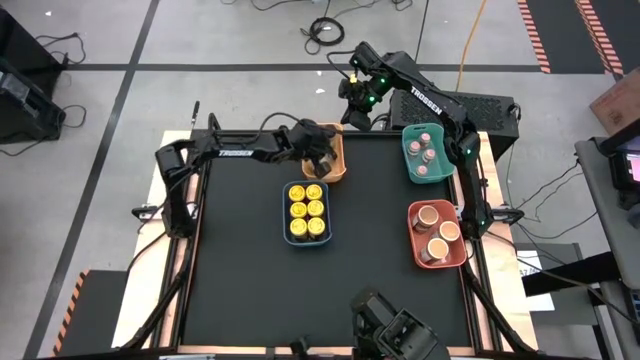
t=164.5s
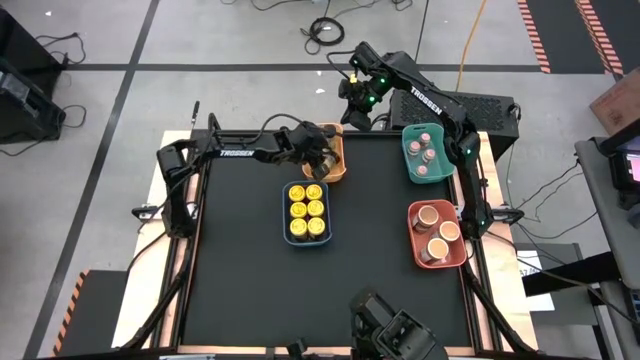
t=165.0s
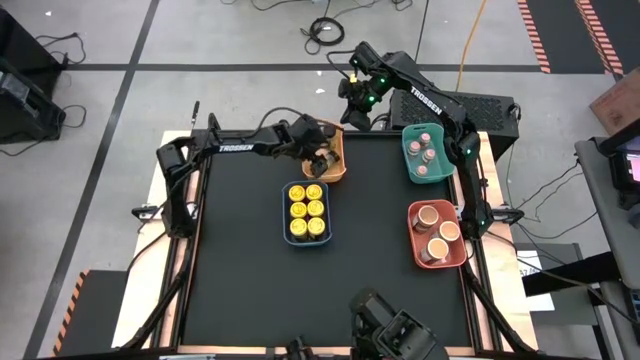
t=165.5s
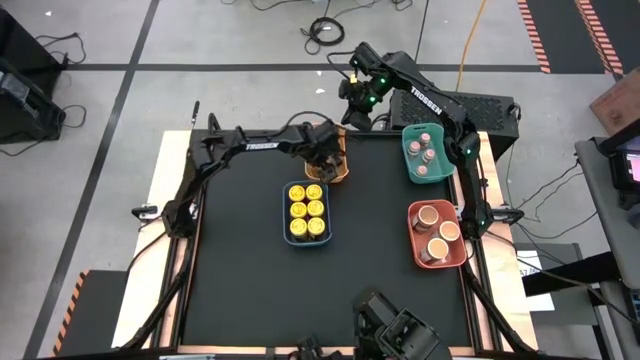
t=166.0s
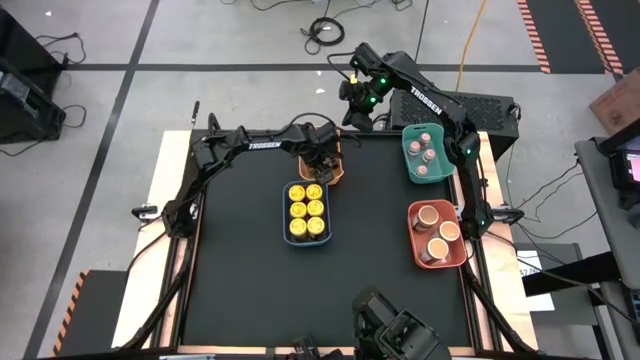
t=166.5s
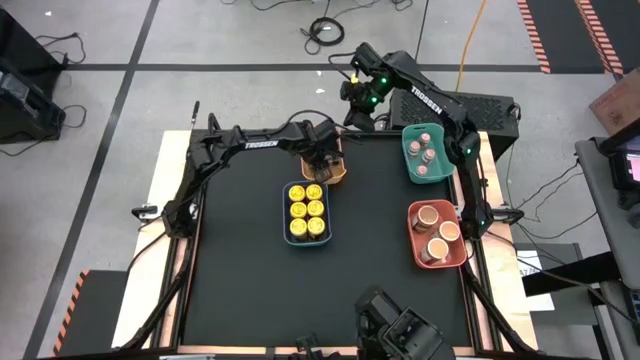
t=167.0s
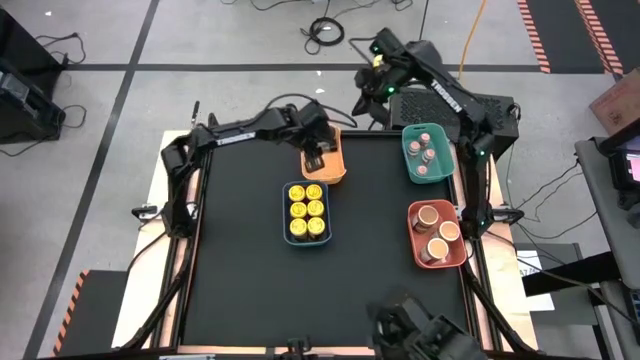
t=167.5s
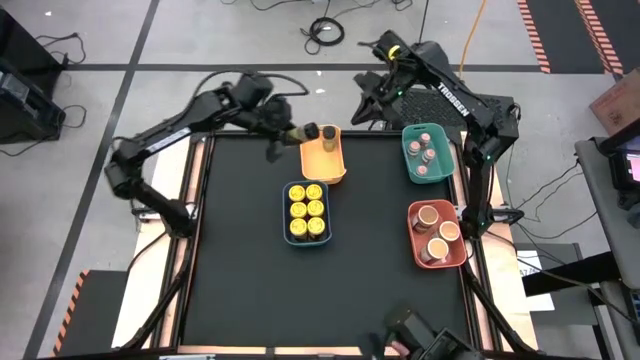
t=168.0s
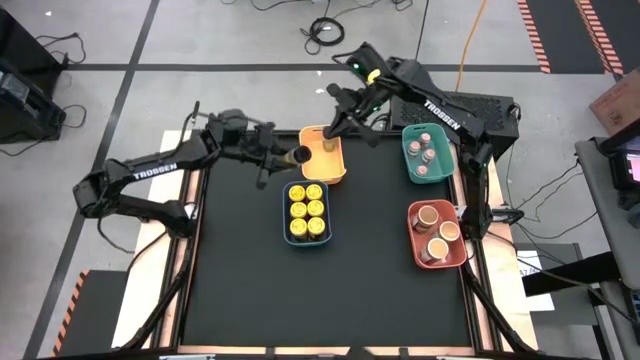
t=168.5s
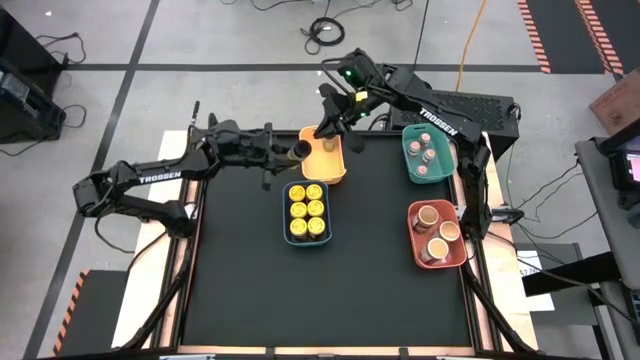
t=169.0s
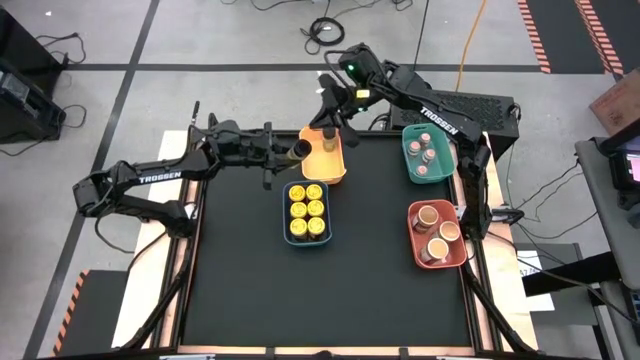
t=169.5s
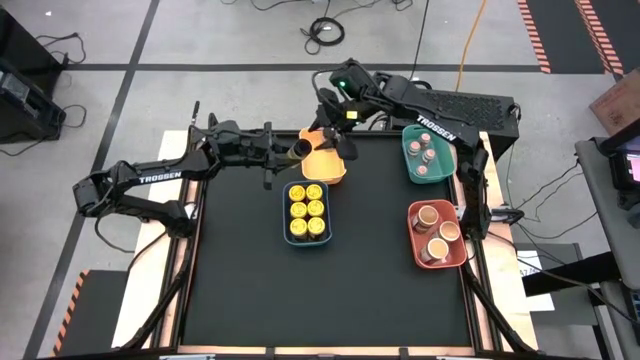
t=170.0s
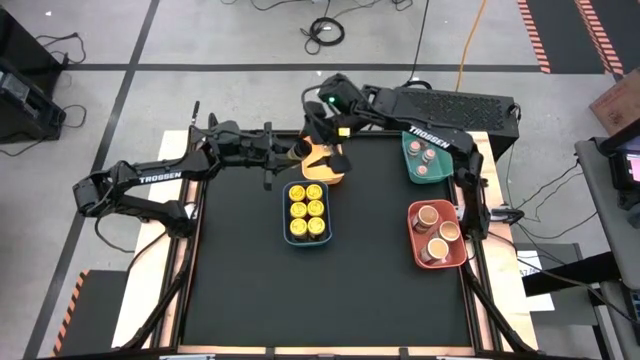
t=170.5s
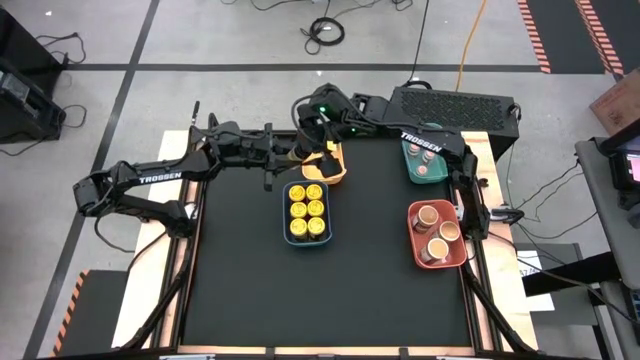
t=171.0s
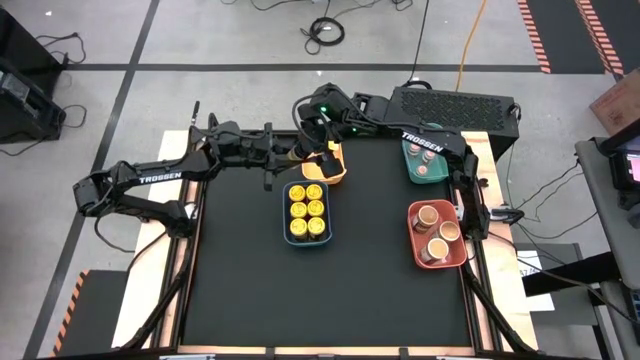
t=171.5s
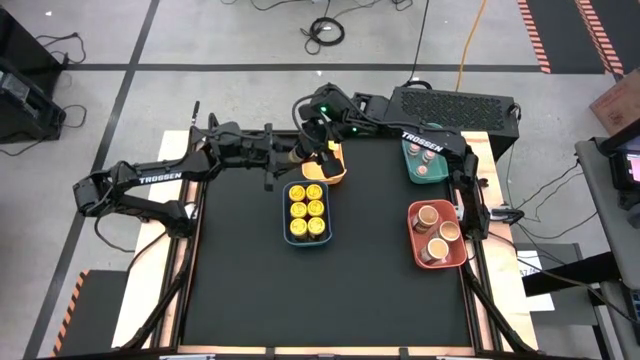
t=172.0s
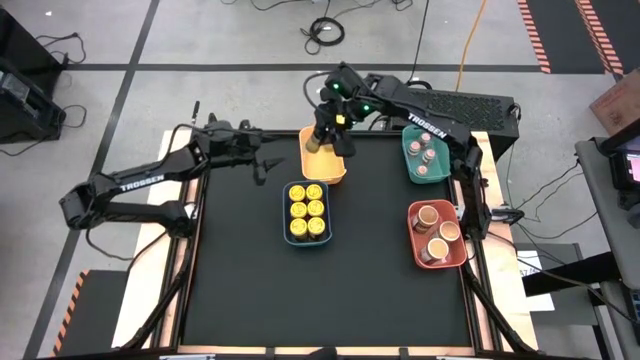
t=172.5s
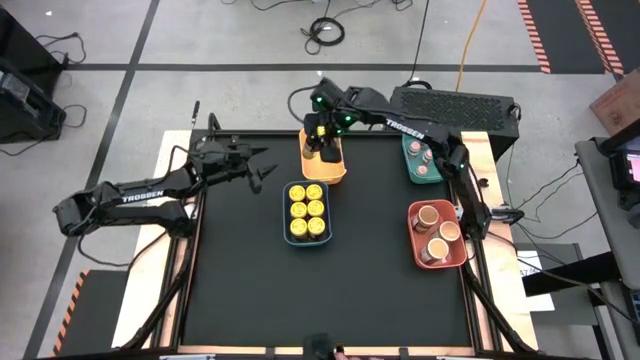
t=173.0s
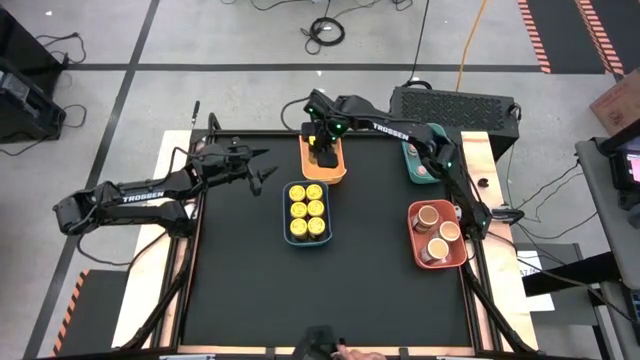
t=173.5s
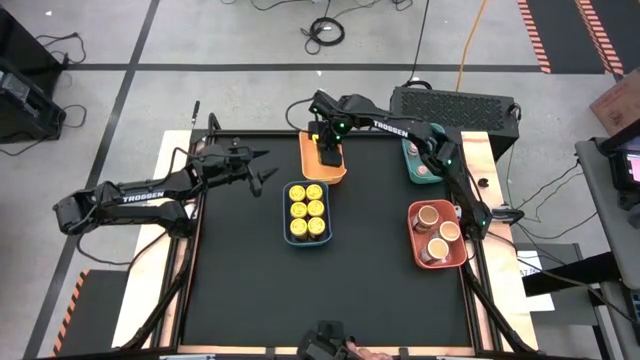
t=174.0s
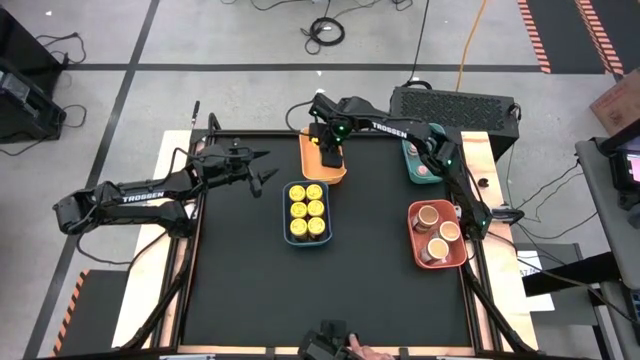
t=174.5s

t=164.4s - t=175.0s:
Task: Sort spices by type
Put the black seasoning bottle into the yellow bin

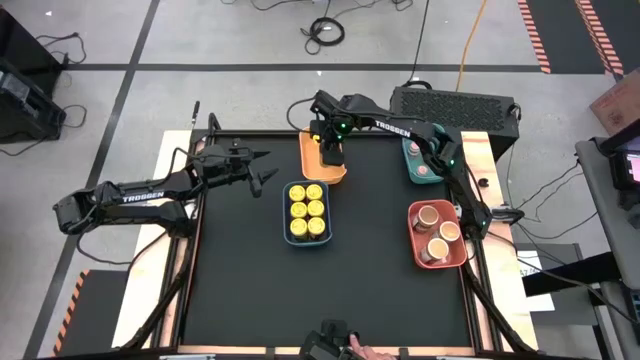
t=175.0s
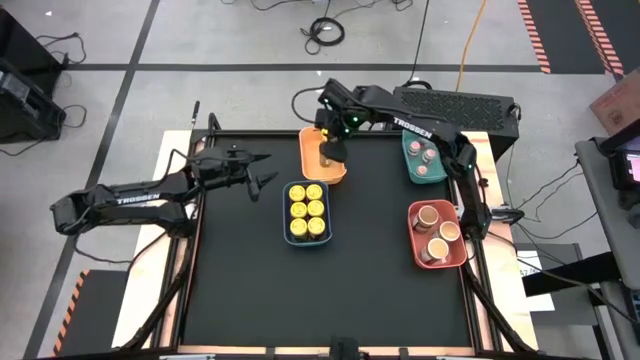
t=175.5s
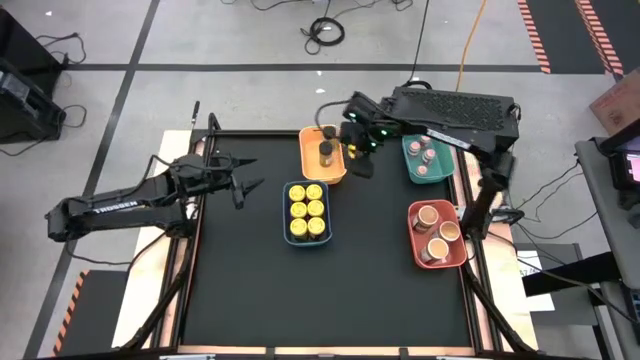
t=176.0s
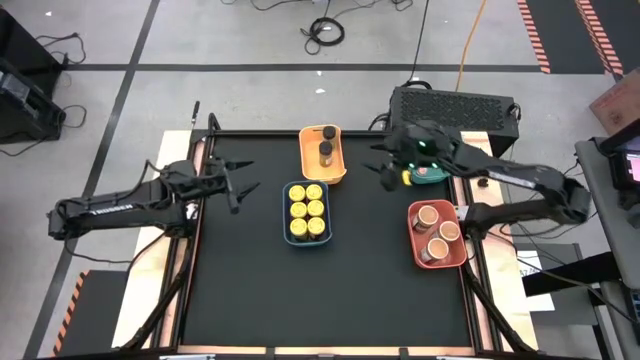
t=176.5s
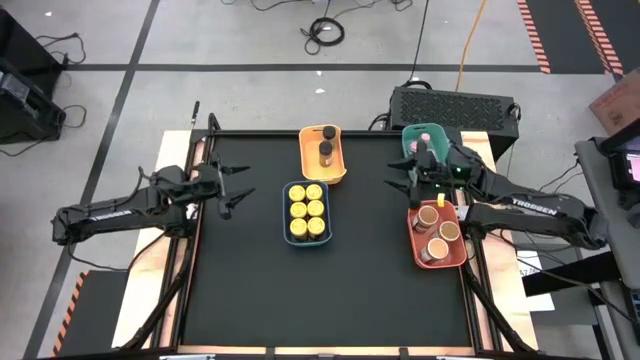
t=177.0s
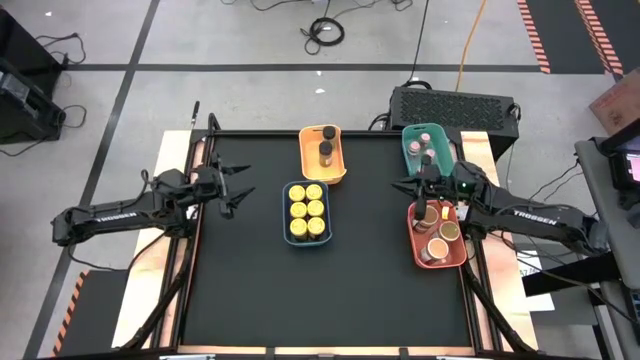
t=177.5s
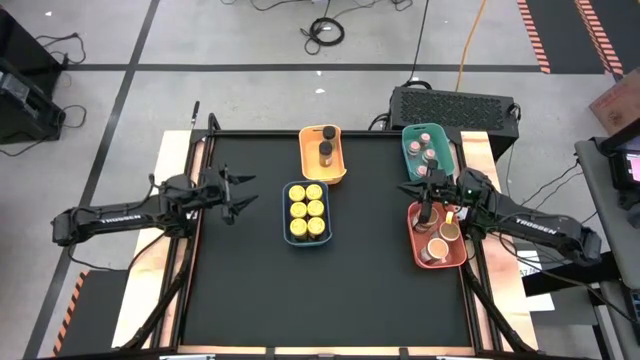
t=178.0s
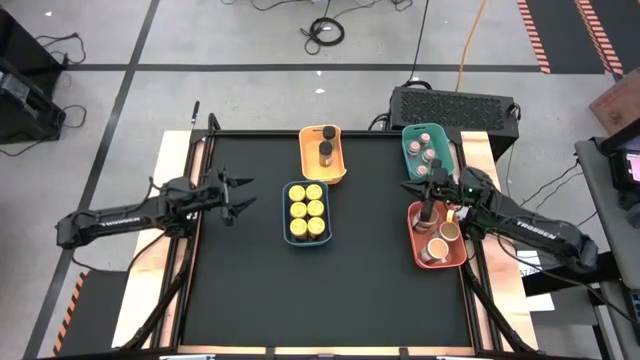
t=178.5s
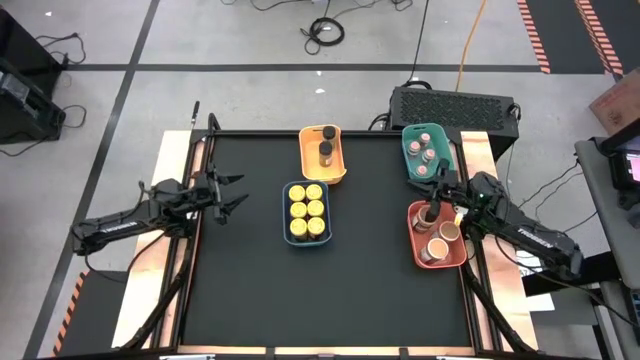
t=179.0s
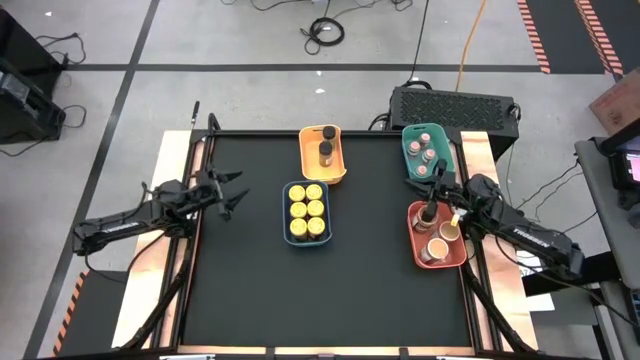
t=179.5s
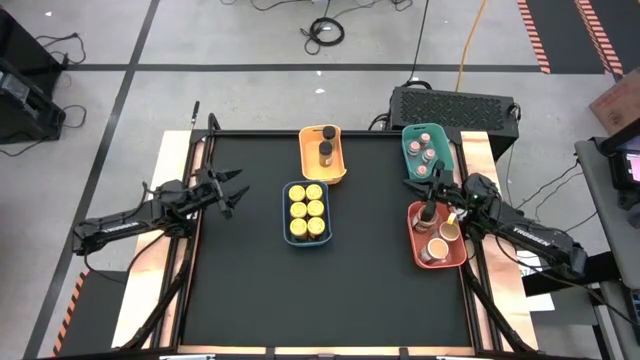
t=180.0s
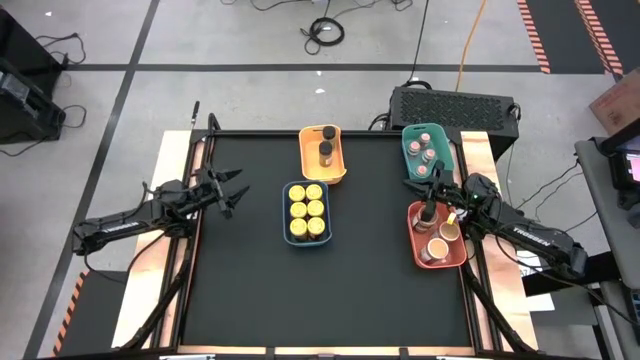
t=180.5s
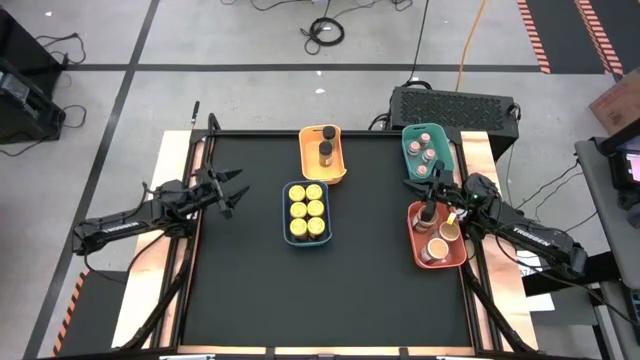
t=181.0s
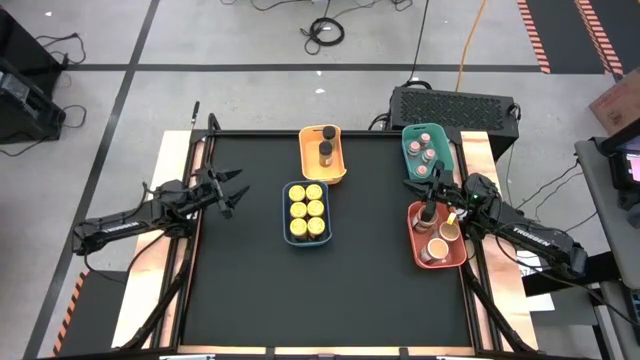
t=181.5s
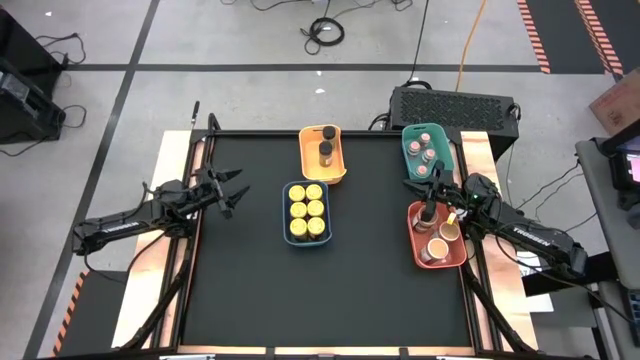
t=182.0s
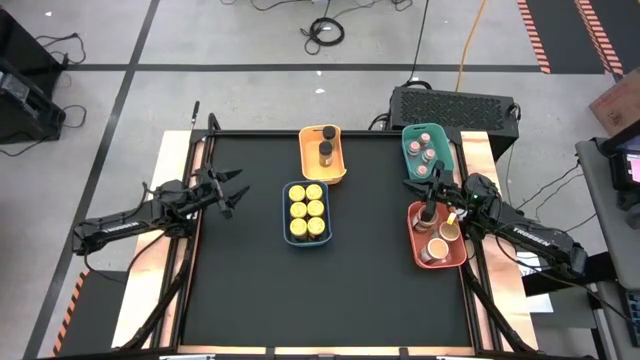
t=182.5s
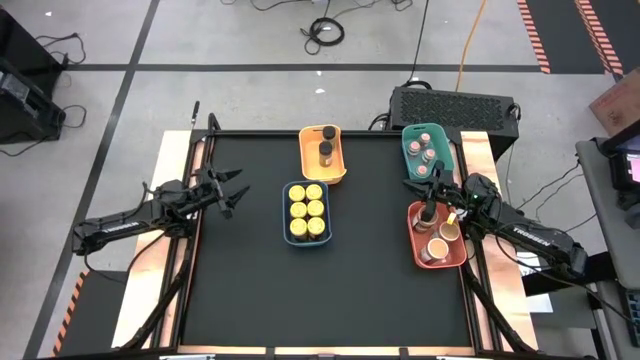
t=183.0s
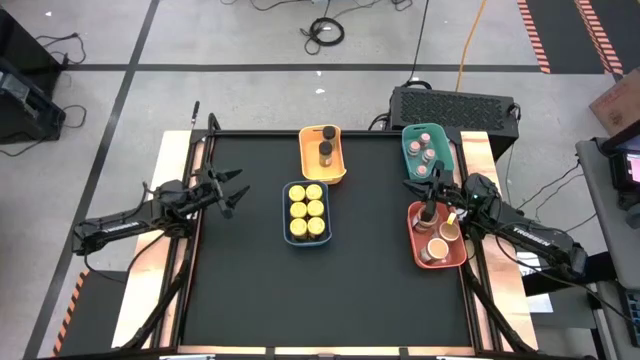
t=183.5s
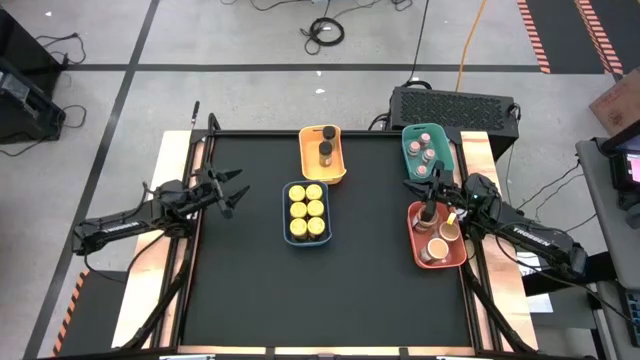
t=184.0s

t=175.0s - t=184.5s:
Return to Home Position

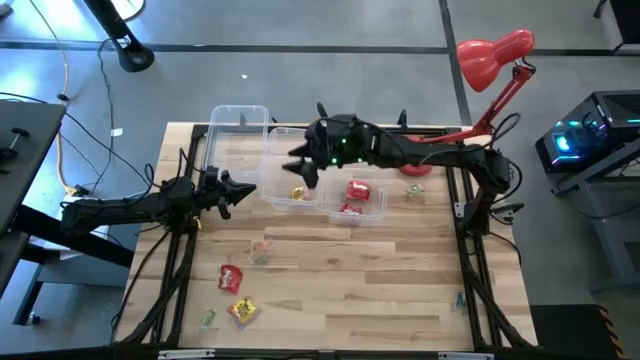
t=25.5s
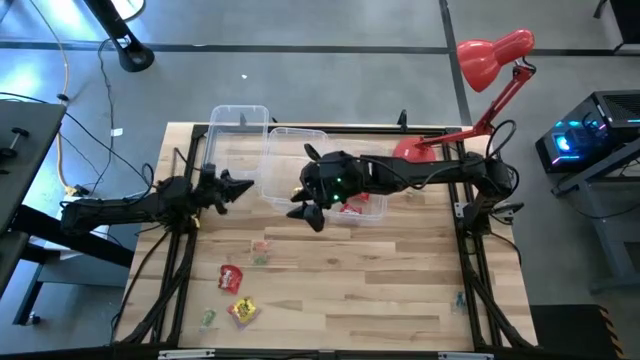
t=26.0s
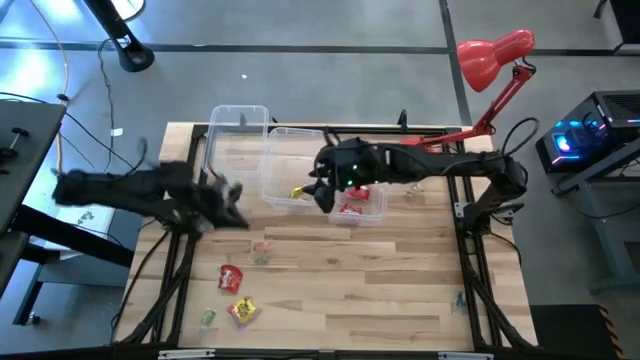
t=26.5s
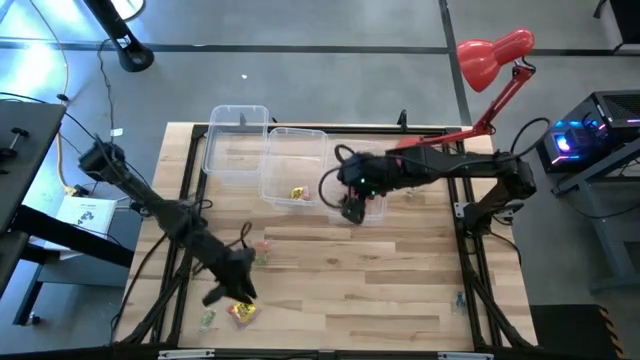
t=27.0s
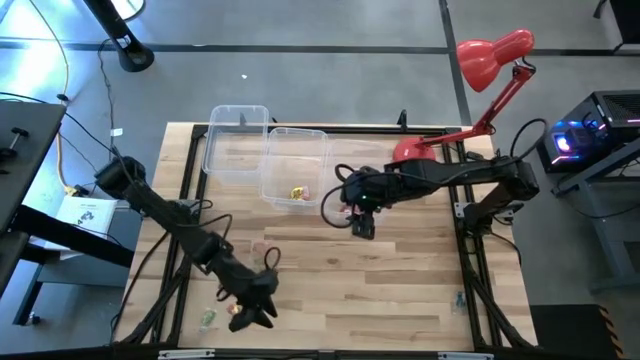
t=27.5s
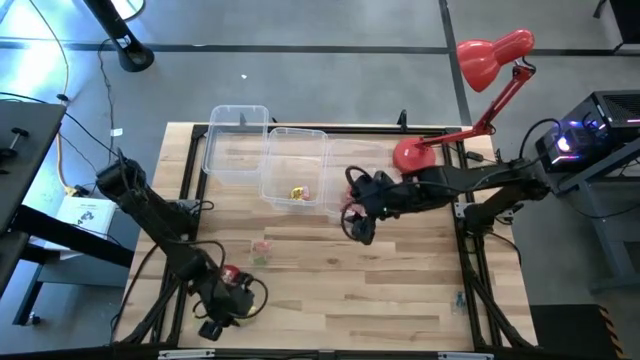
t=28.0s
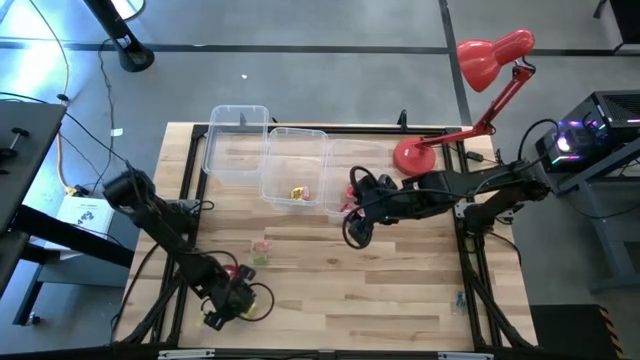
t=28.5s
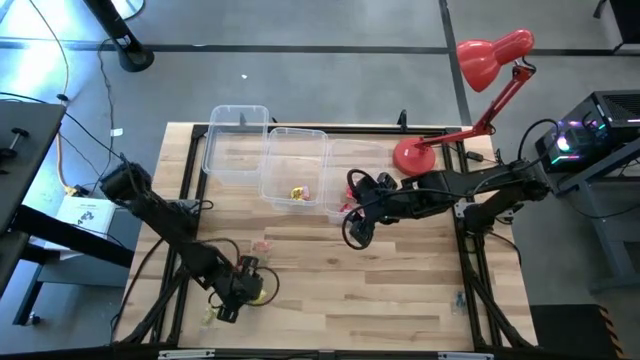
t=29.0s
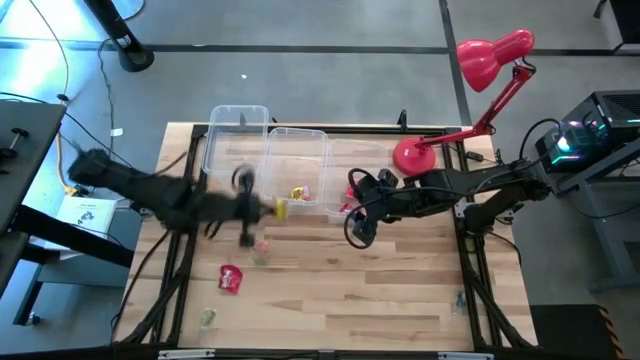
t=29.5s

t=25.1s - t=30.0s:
Task: Sort candy
Put the yellow candy pack into the top center transparent bin
